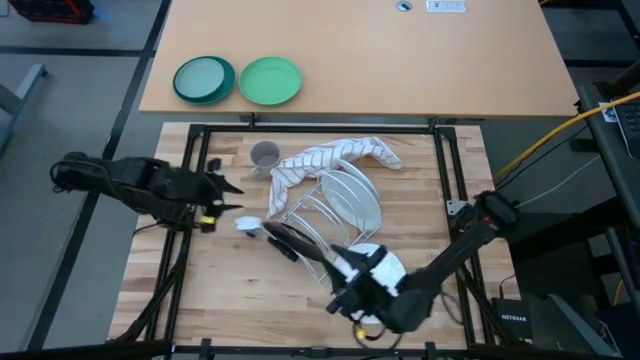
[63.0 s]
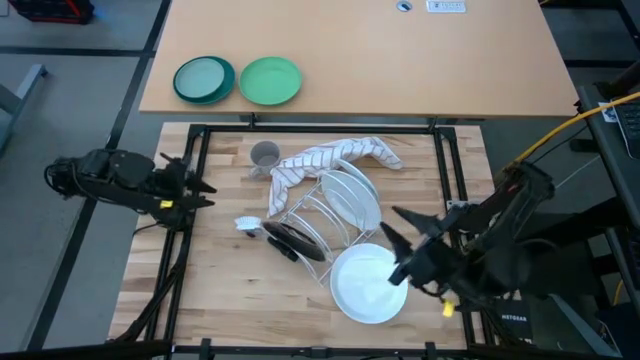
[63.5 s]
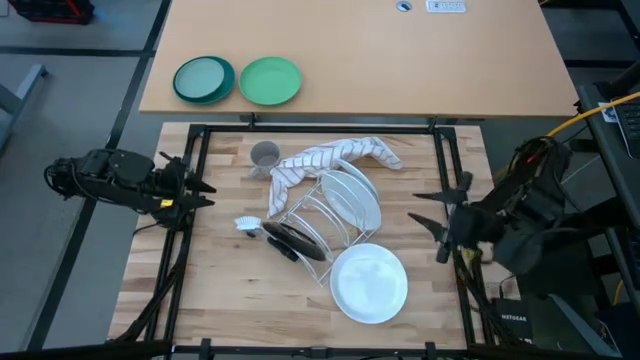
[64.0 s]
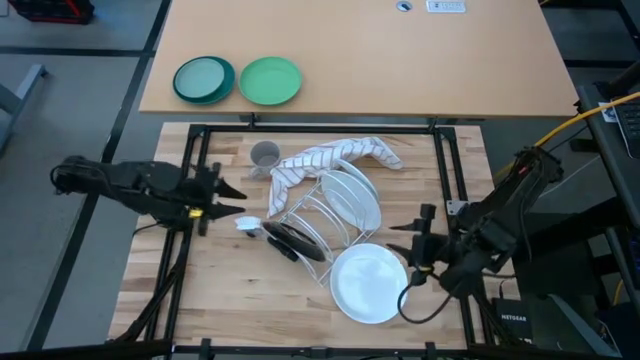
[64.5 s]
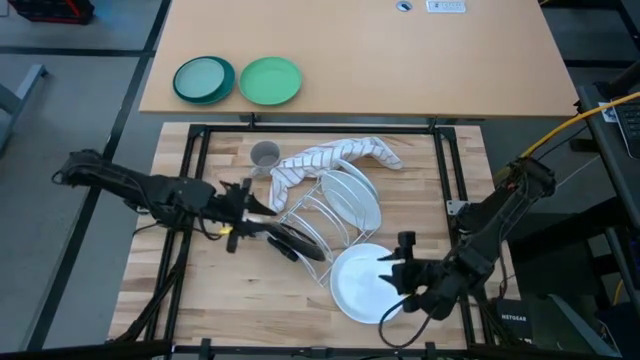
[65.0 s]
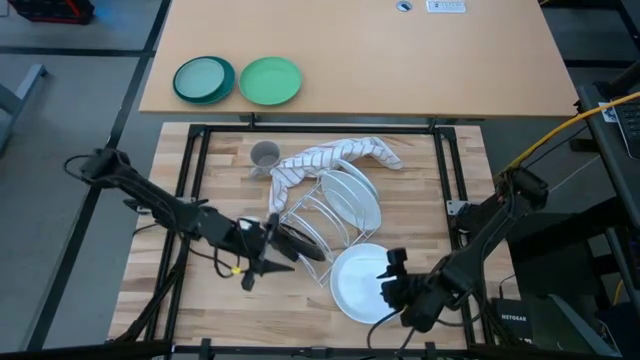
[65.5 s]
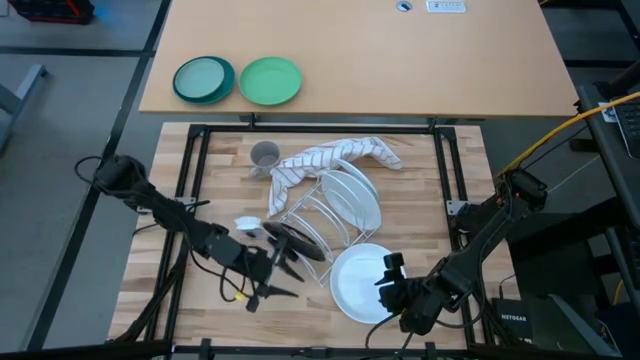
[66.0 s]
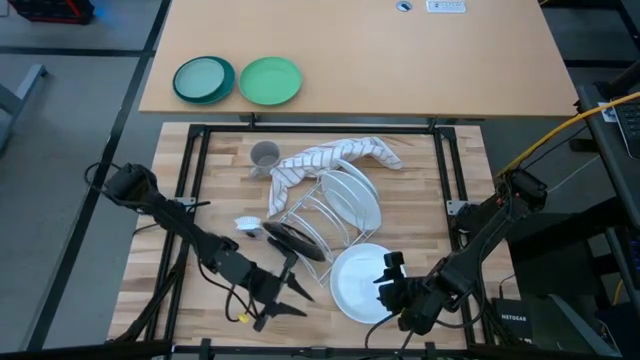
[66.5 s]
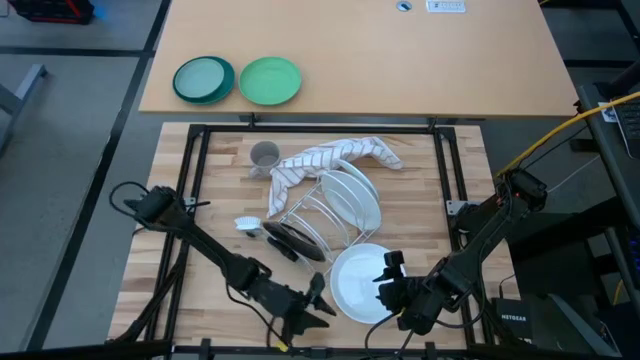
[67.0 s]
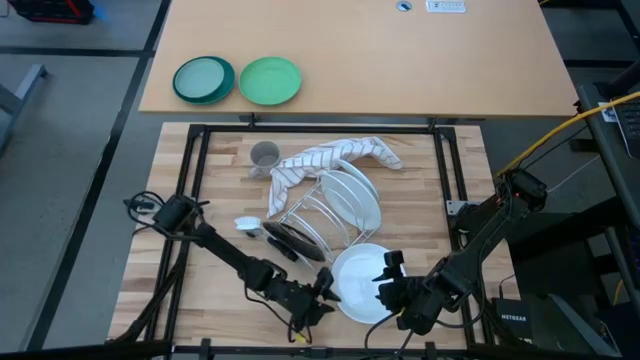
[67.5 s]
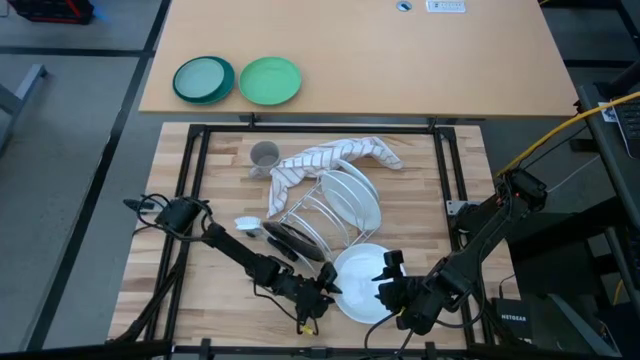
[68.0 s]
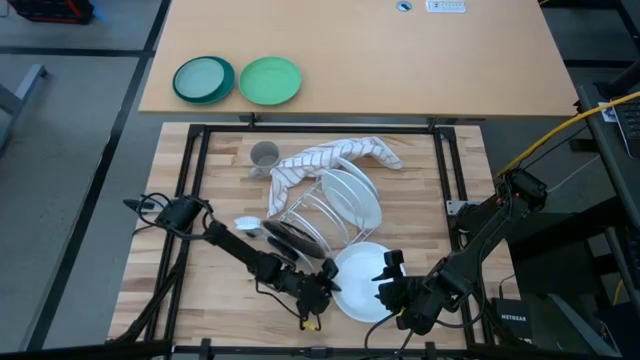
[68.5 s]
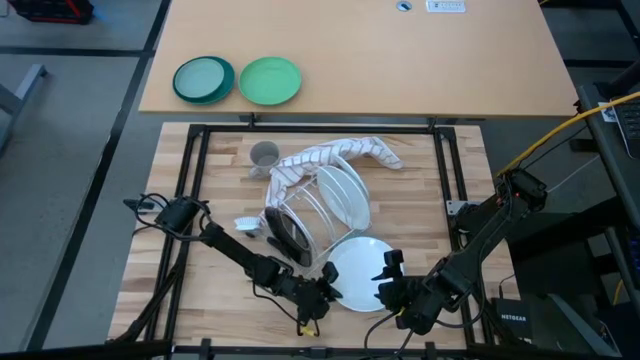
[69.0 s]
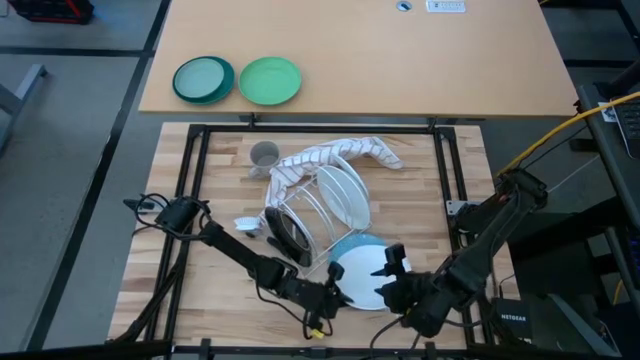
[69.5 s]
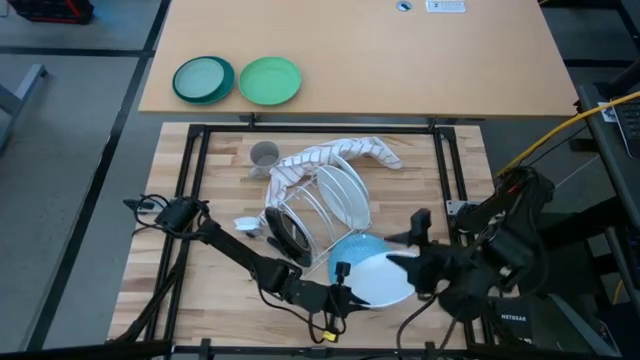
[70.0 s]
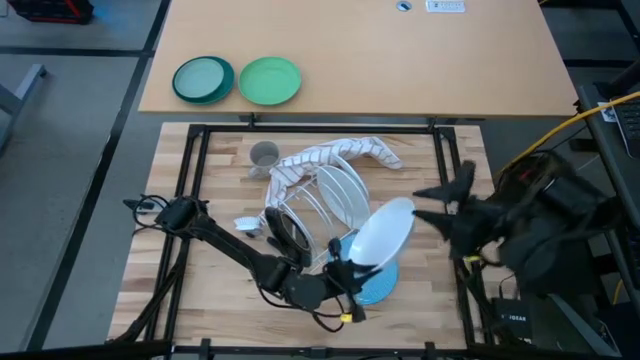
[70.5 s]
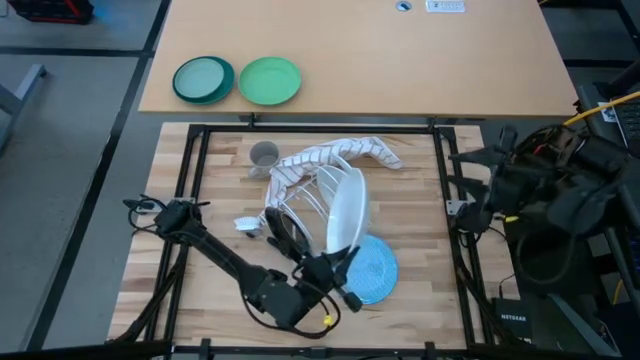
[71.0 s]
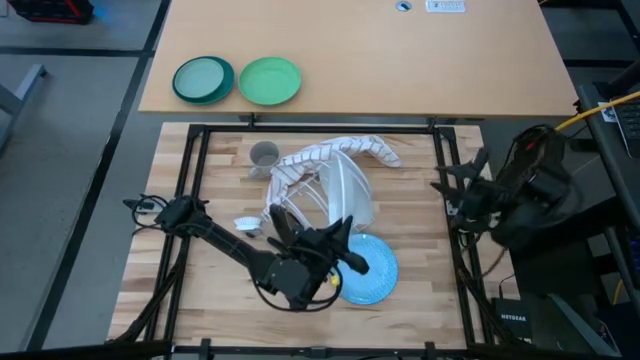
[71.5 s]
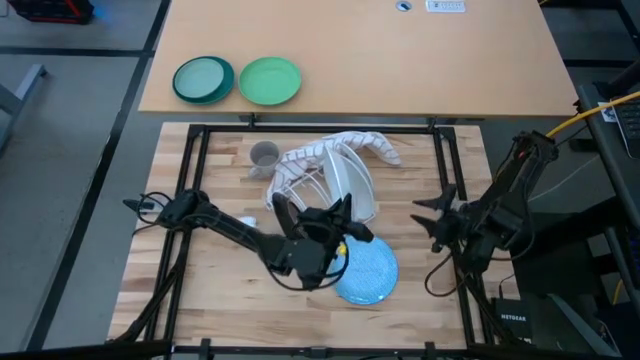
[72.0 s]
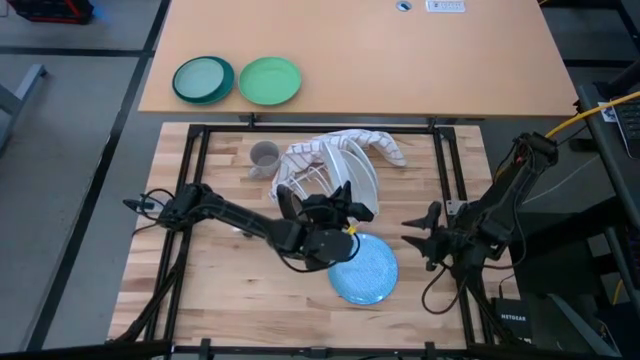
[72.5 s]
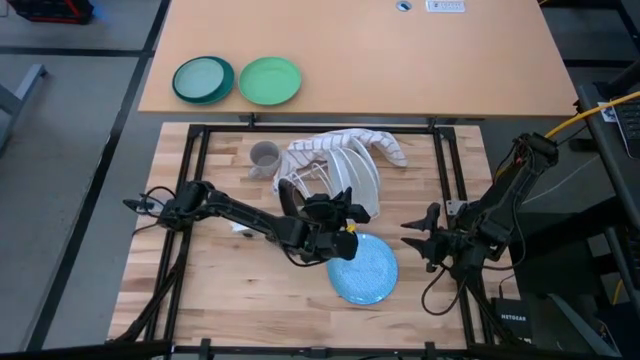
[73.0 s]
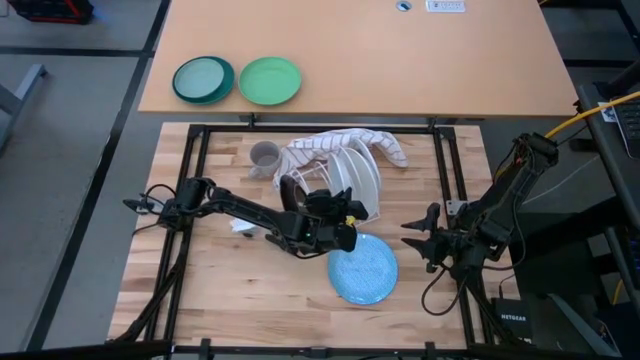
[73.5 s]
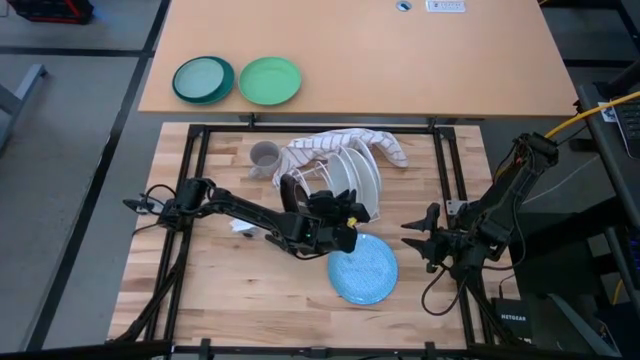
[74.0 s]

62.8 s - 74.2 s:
Task: Sort dishes
Put the white plate in the dish rack

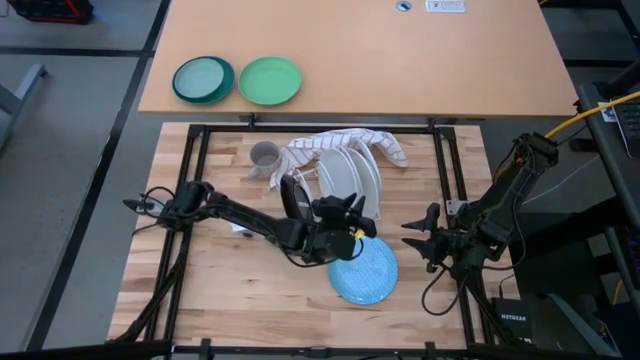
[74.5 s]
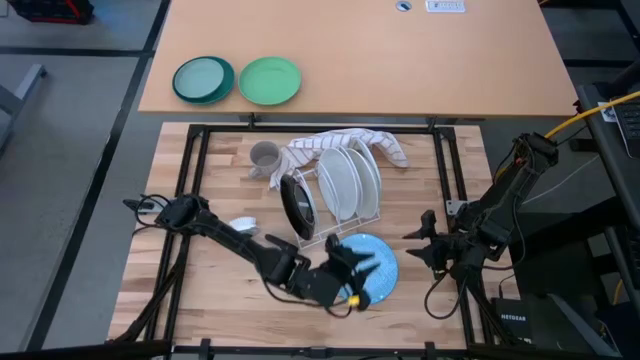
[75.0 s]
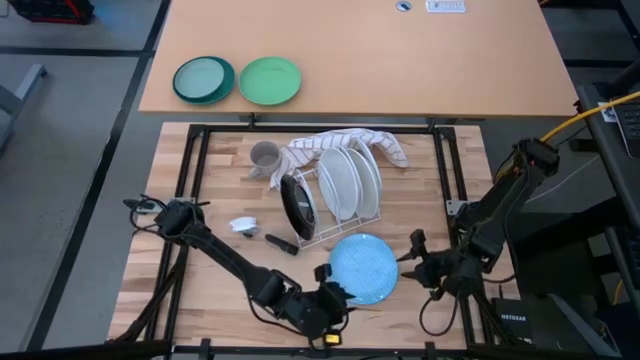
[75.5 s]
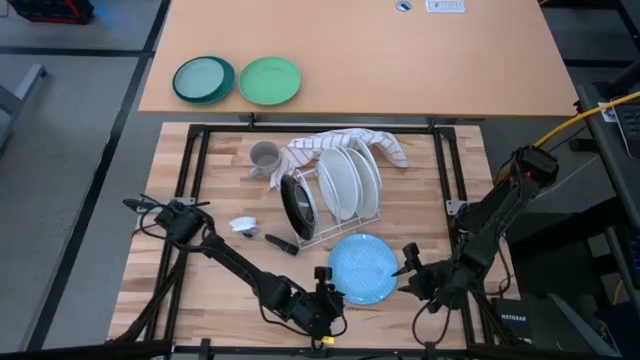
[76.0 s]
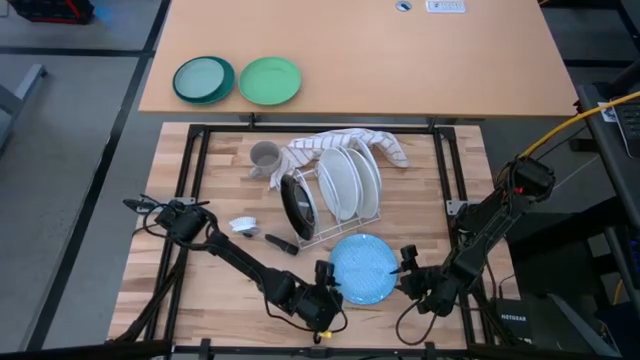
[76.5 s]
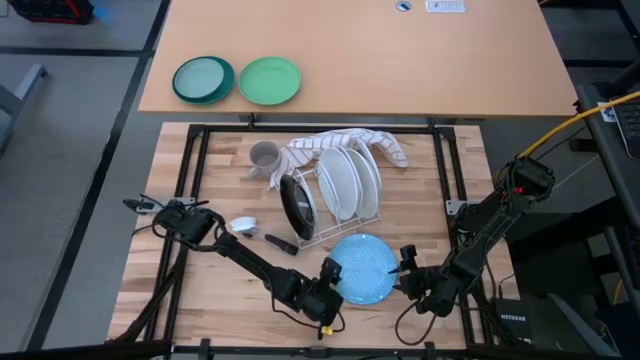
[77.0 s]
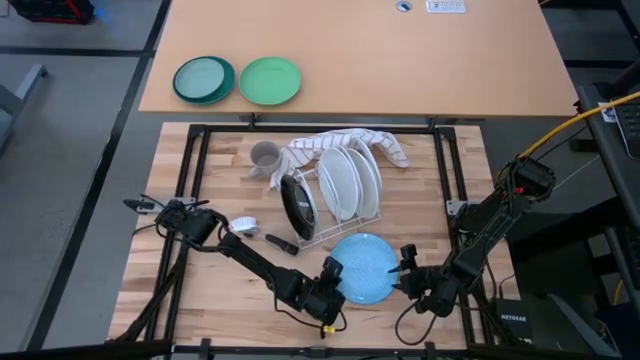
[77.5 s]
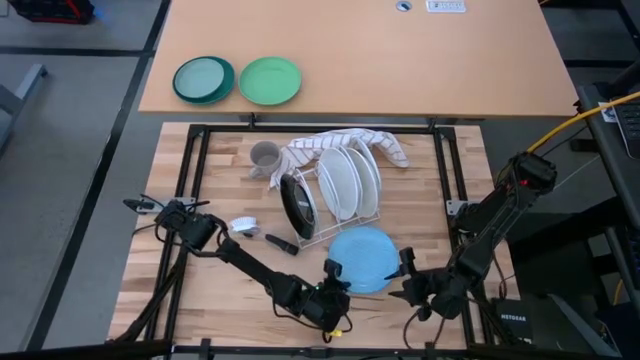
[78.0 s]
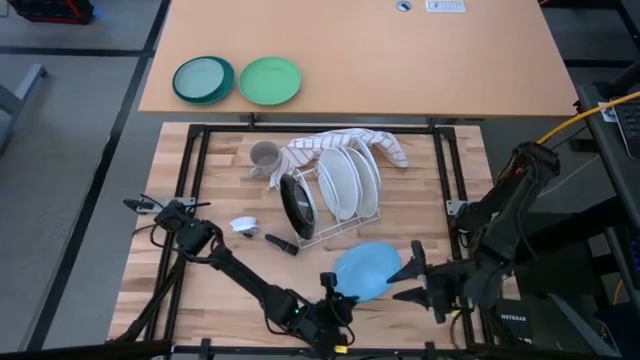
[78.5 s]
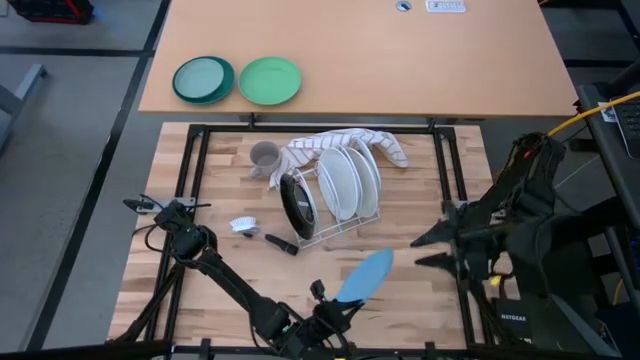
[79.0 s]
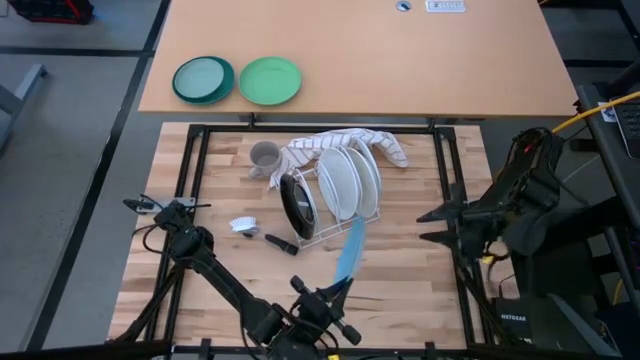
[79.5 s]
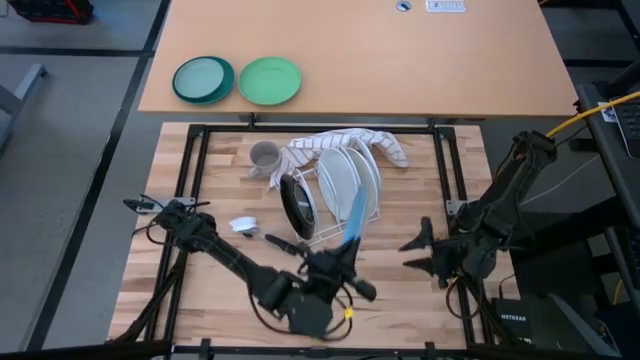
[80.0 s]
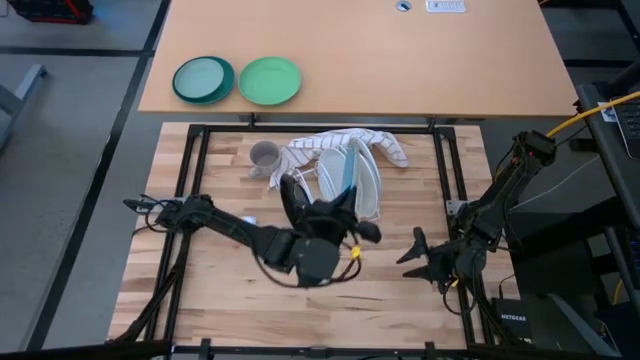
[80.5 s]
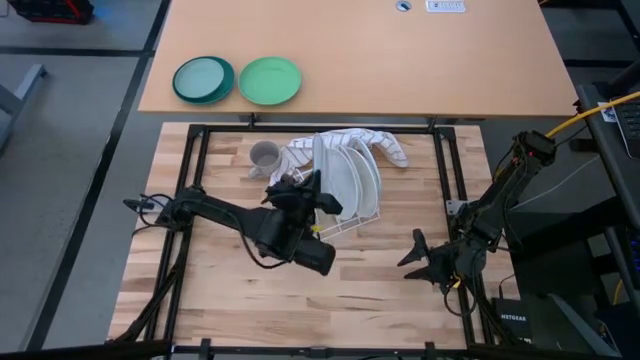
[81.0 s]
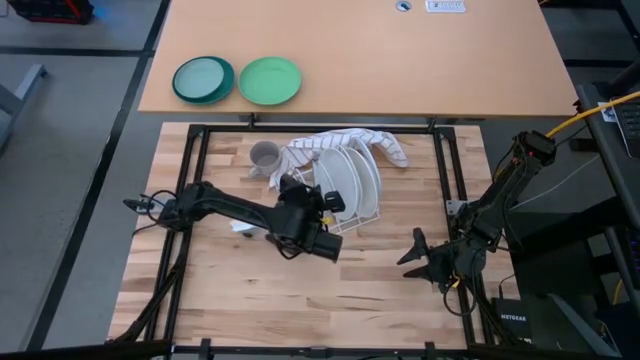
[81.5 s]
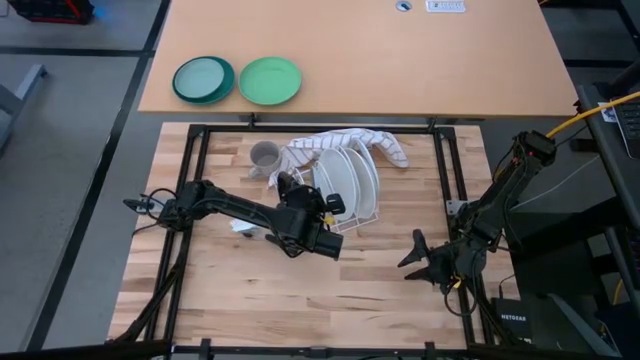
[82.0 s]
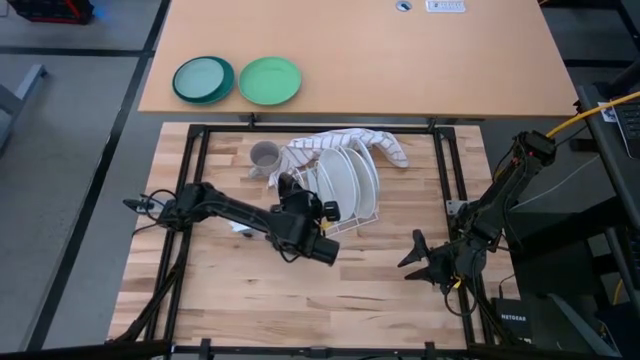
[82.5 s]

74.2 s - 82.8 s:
Put the blue patterned plate in the dish rack

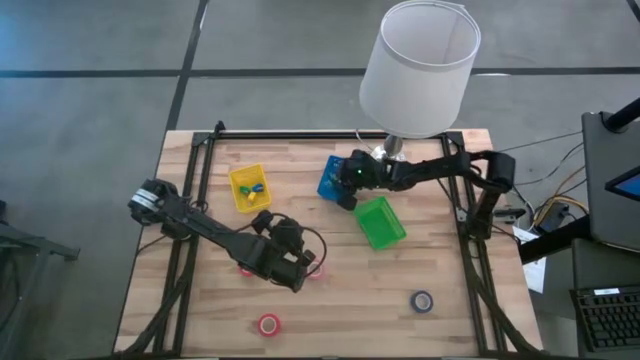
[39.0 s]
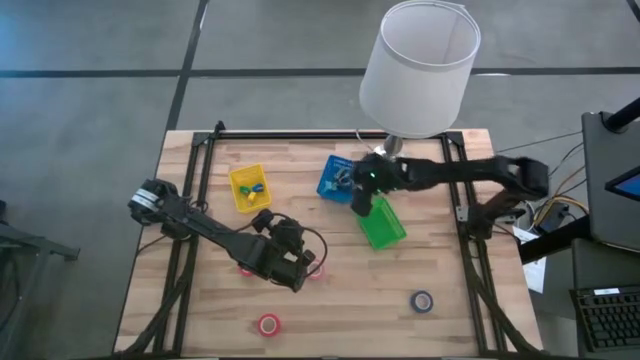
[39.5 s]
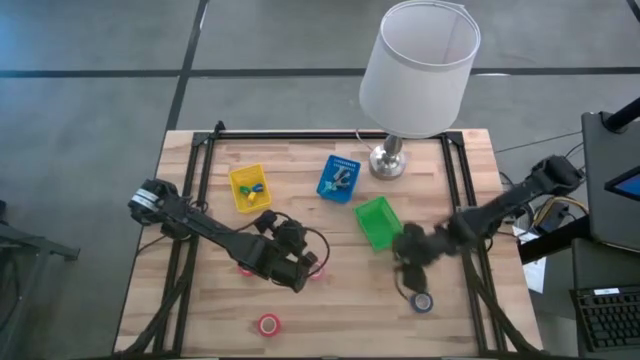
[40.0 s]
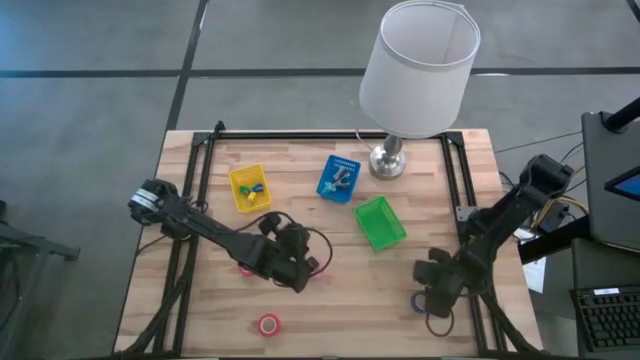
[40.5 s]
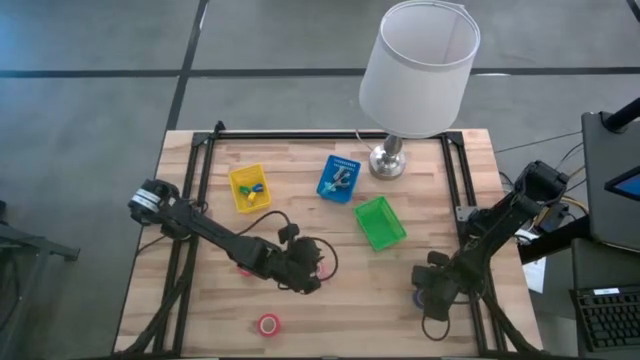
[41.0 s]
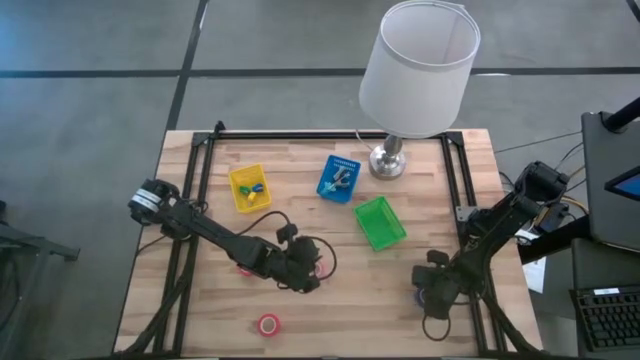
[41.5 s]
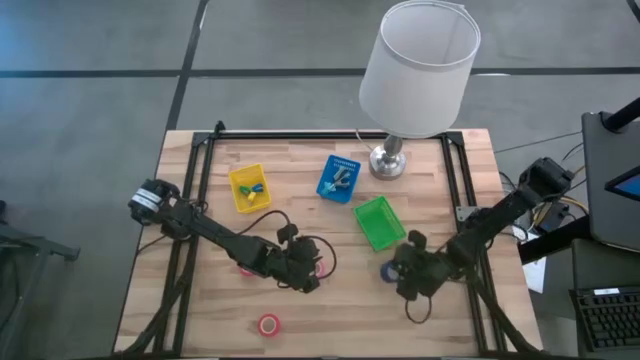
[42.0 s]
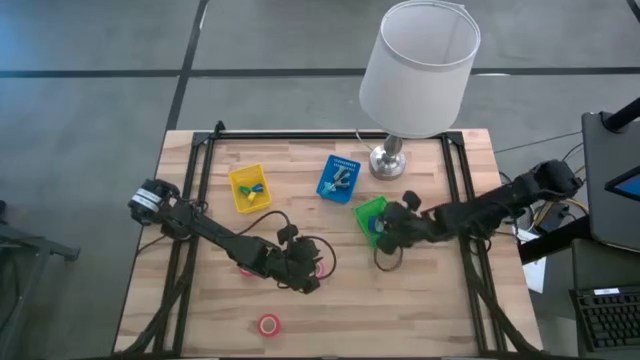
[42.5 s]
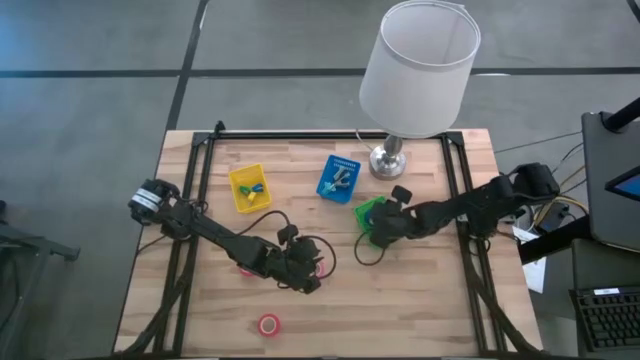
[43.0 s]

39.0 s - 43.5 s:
Task: Pick and place Stapler, Stapler remover, tape
Put the purple tape into the green basket
